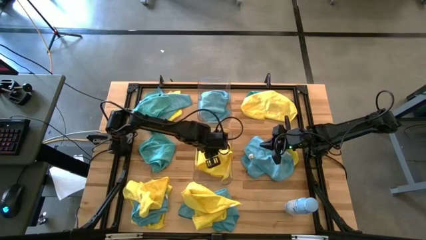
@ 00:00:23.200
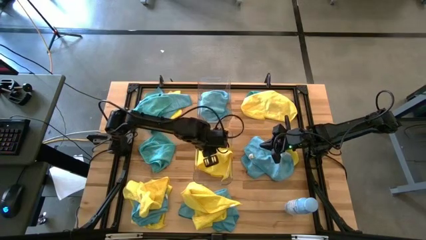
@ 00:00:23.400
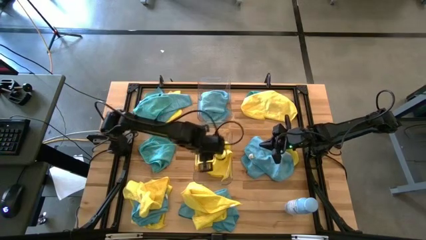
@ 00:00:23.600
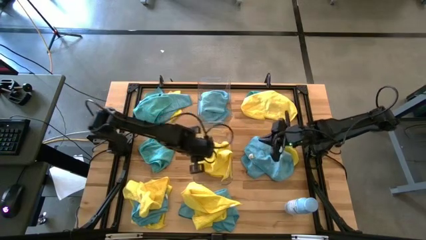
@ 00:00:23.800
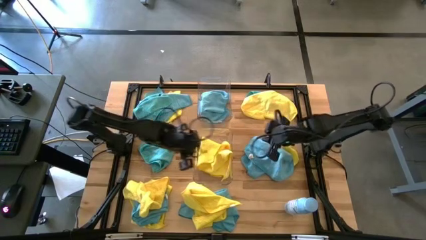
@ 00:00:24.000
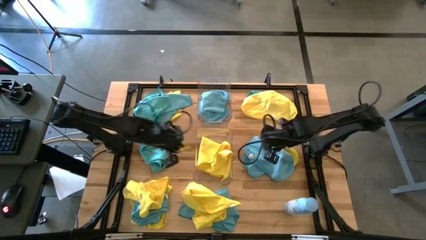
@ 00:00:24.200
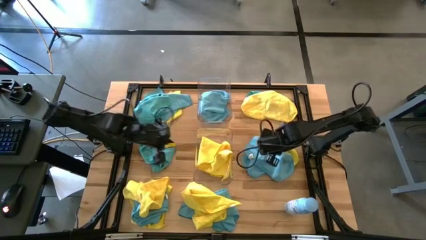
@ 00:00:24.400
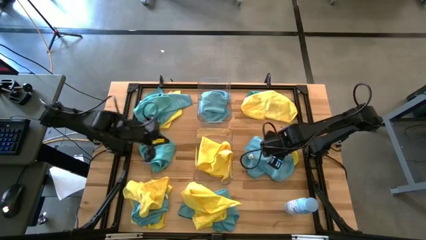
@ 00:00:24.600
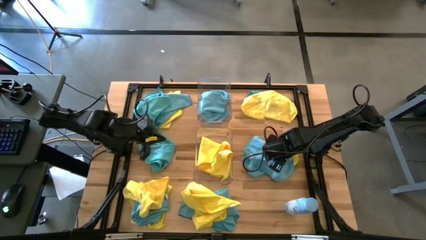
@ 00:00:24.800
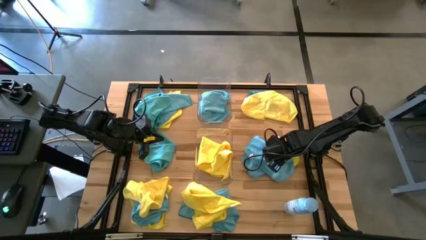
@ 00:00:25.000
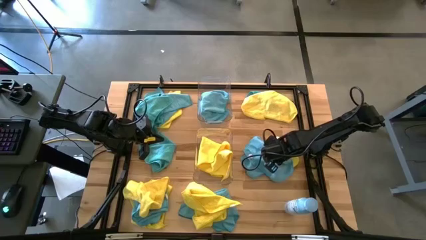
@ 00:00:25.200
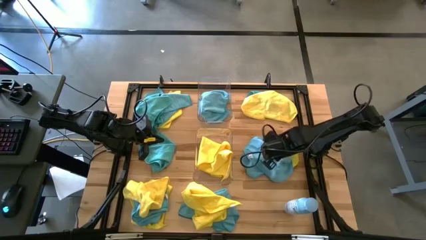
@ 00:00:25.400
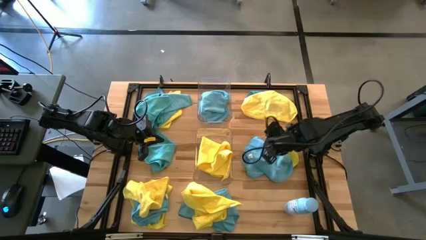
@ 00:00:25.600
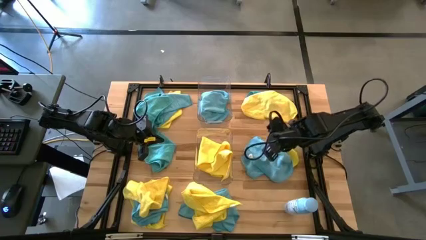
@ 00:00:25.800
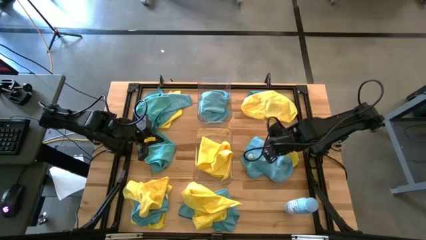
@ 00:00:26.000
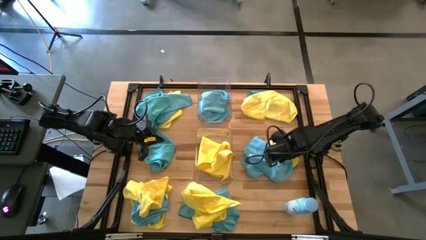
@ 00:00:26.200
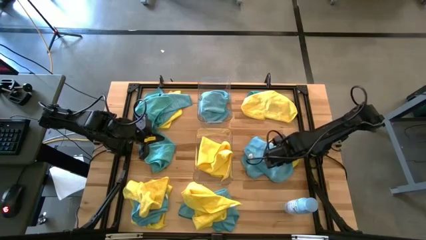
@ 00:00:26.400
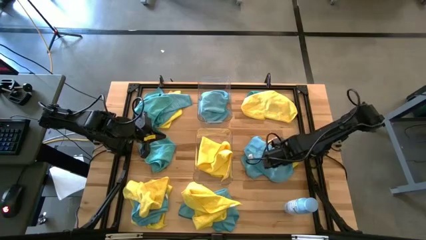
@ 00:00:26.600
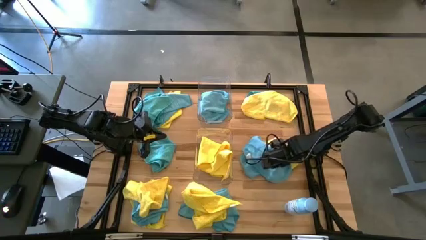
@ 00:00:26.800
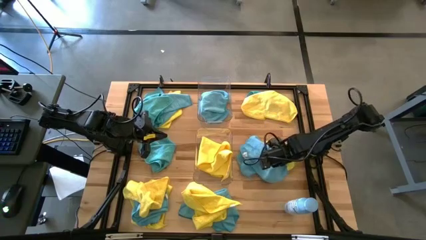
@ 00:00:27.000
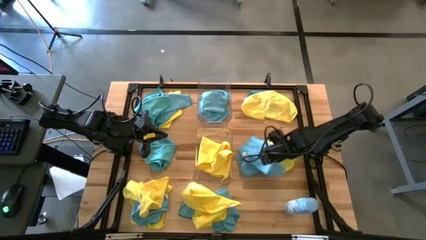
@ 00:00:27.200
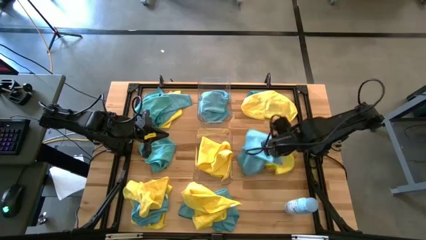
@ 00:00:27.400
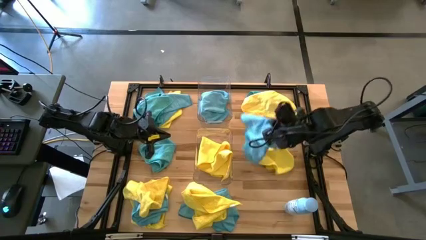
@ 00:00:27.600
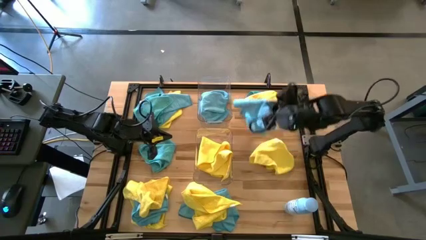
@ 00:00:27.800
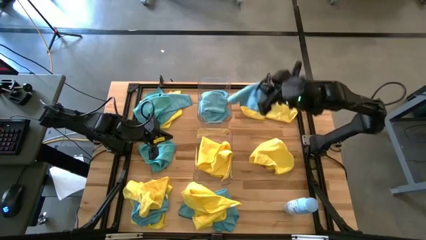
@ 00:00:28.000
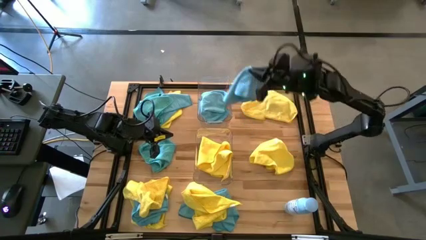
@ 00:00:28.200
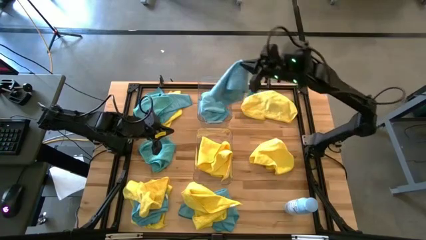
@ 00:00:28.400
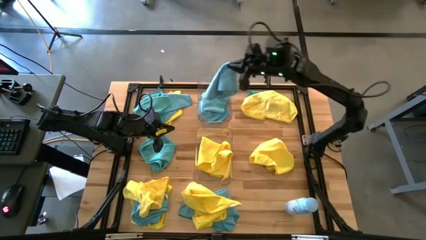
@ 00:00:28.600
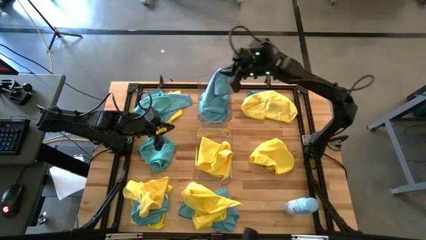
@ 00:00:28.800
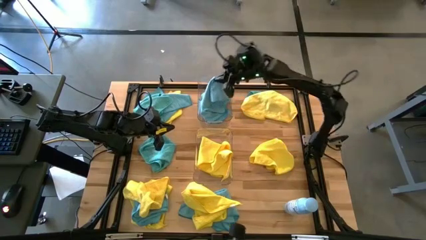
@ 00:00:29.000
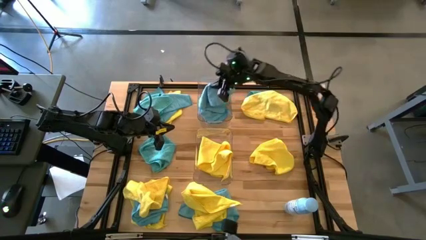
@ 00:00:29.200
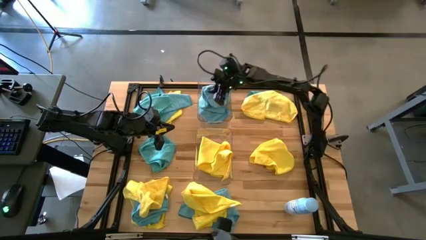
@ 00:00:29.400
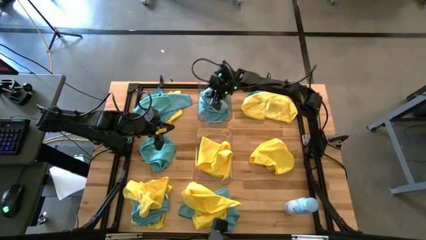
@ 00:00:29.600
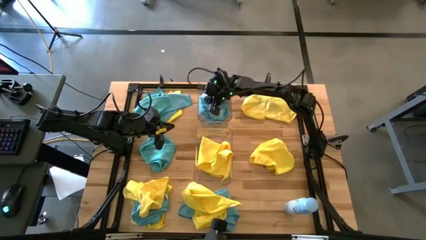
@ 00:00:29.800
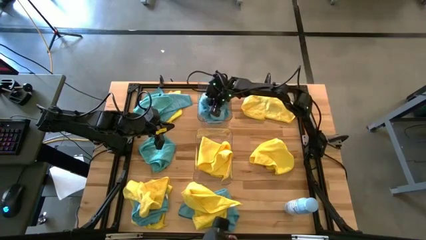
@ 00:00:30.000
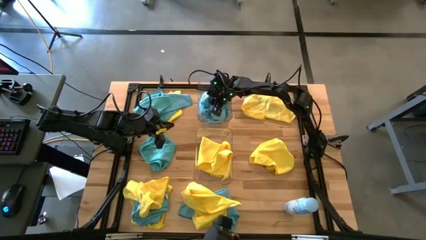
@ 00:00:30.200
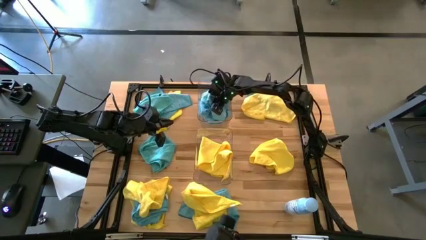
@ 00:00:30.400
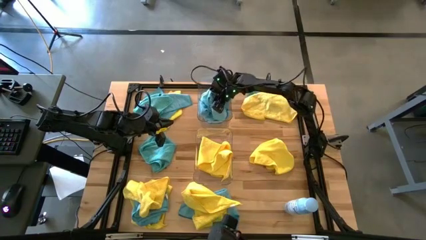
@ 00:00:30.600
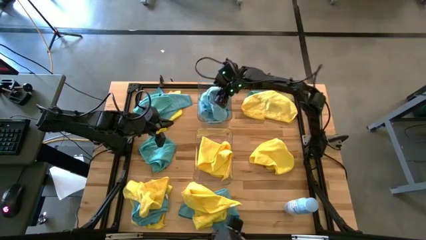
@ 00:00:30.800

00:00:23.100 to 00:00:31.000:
Task: Sort microfiber towel by color & place in baskets
Put the blue towel into the top transparent bin

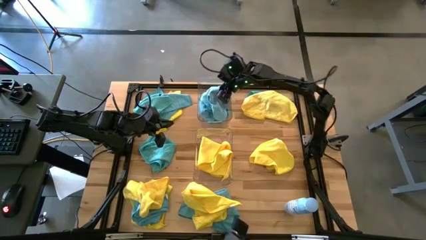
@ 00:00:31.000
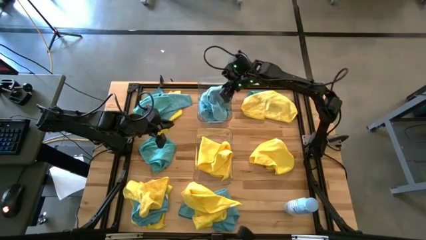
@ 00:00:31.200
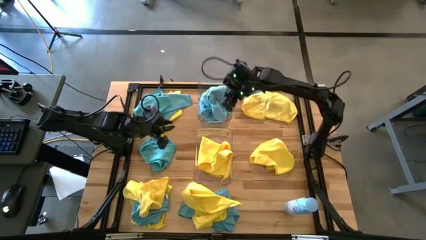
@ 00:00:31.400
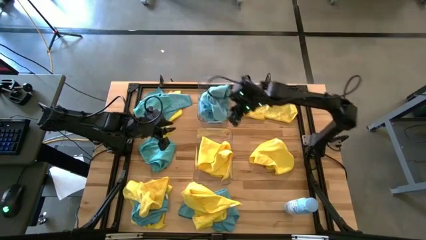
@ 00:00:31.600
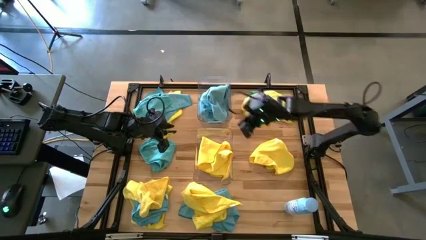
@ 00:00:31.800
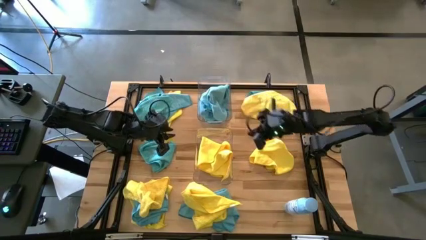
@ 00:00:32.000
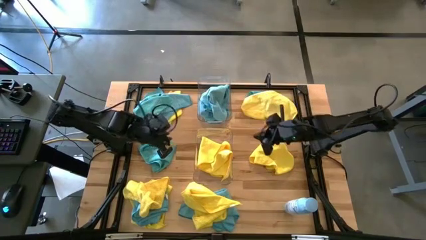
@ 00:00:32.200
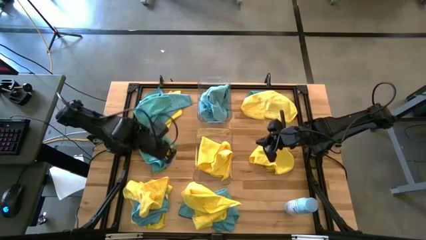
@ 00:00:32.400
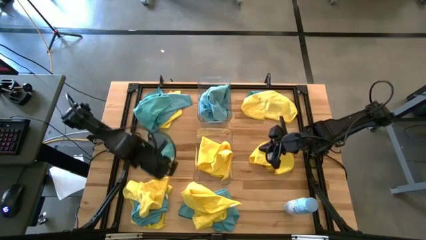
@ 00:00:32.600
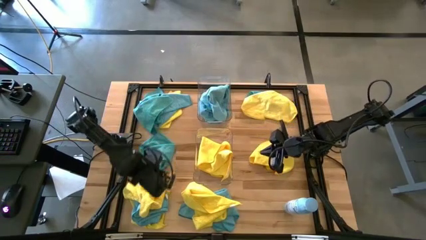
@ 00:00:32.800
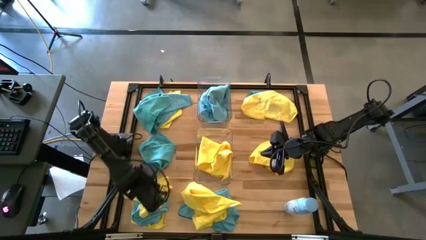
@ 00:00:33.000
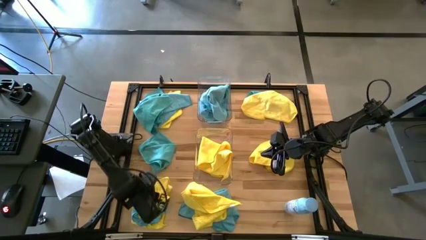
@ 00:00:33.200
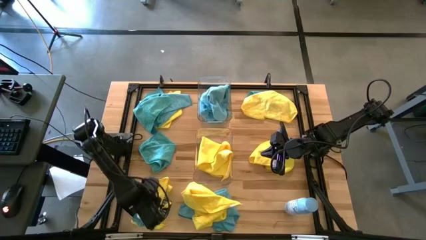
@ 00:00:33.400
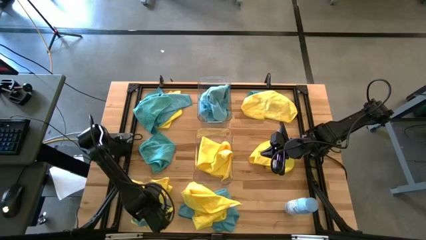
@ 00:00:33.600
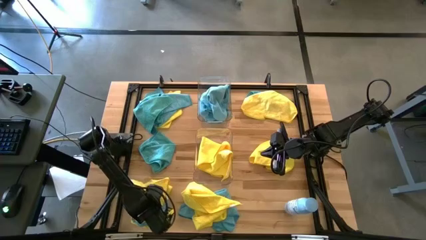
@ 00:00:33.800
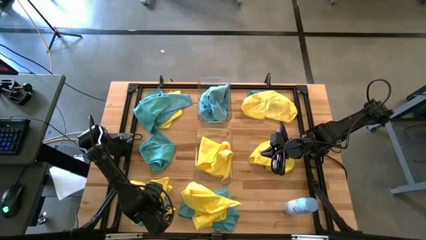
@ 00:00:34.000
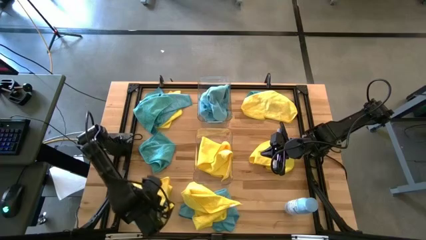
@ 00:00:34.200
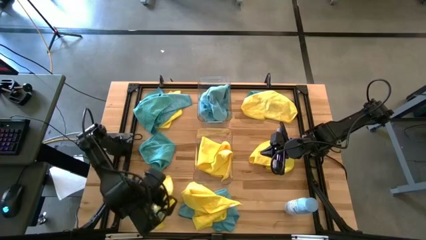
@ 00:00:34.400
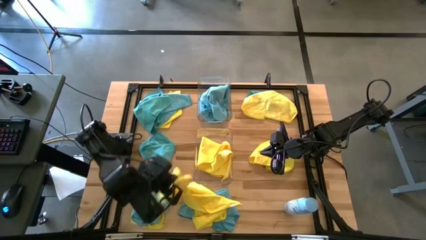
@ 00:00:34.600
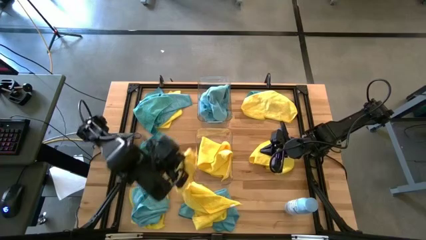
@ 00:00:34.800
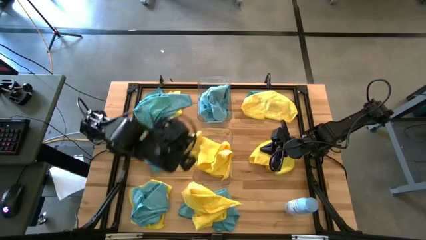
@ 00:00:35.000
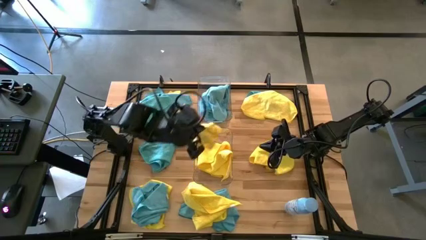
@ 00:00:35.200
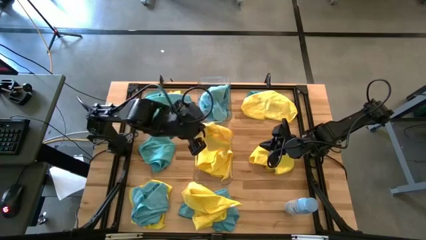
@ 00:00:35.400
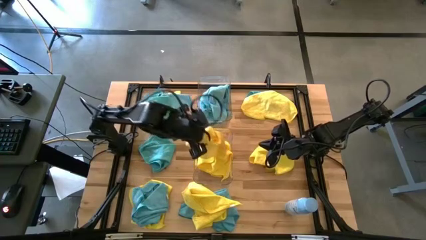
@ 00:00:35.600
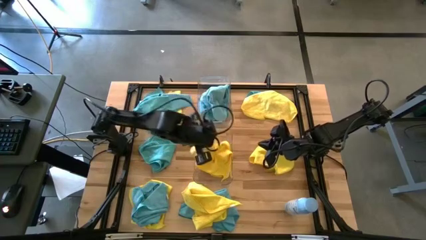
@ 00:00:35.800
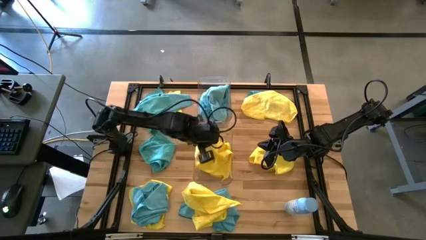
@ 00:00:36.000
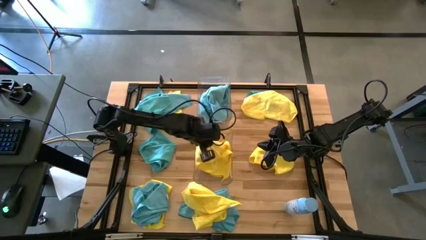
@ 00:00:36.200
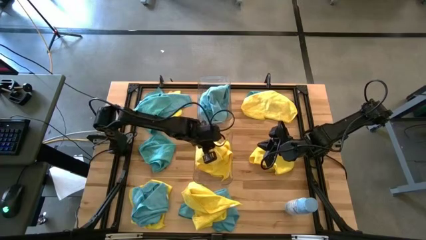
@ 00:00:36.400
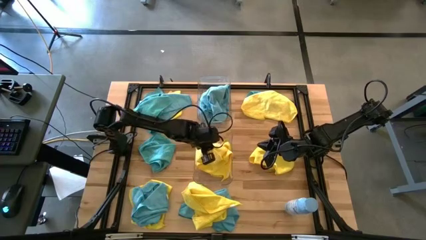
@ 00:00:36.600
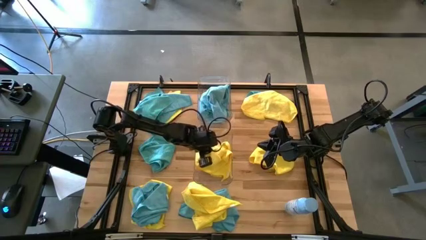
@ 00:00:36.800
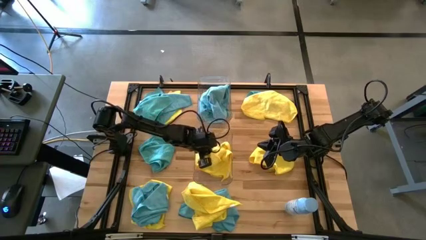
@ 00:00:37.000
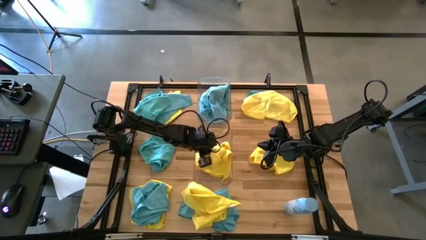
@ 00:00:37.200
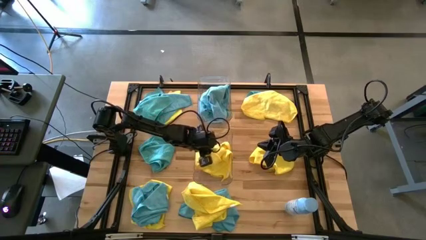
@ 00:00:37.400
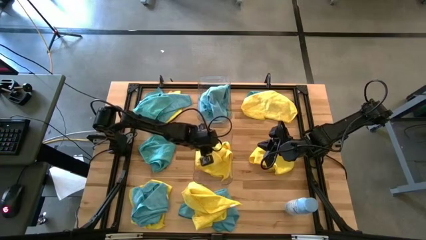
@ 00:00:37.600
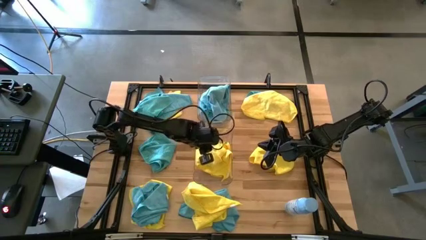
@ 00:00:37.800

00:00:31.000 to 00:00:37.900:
Put the yellow towel into the bottom transparent bin
